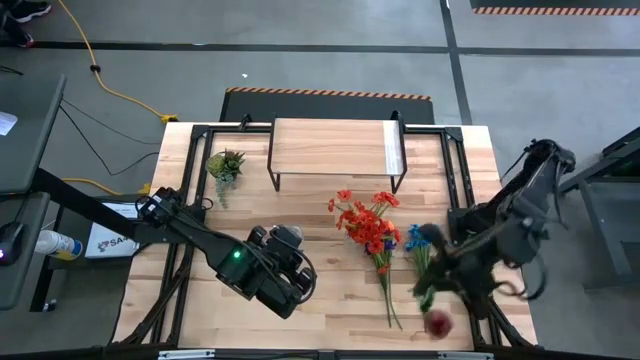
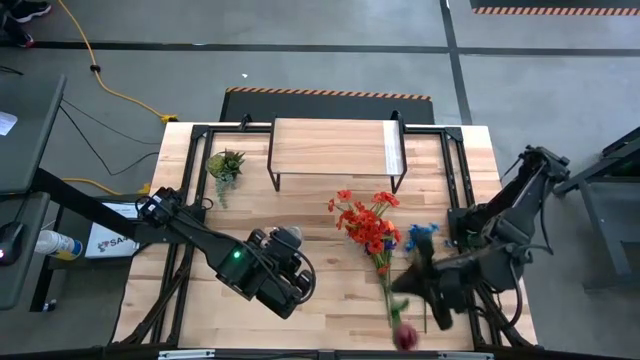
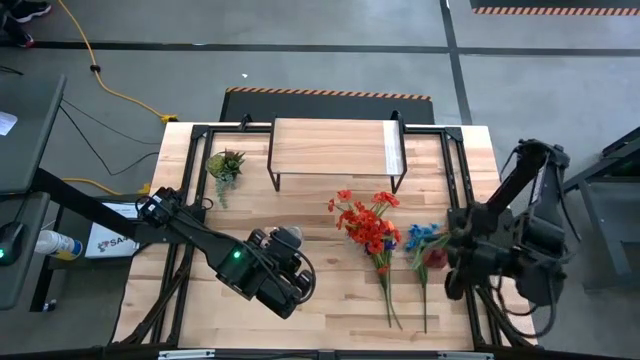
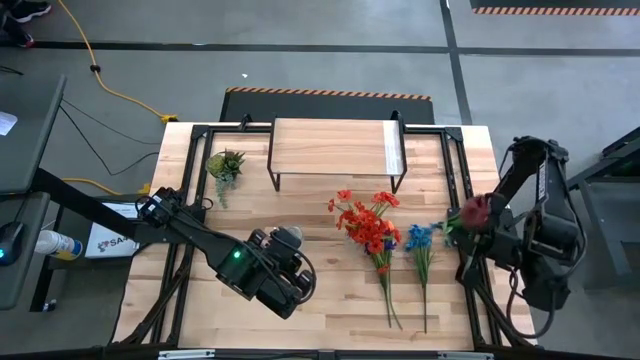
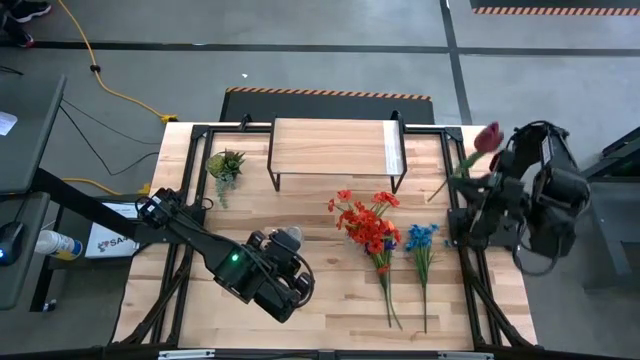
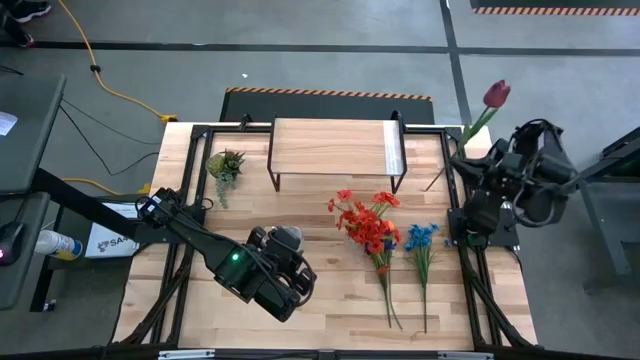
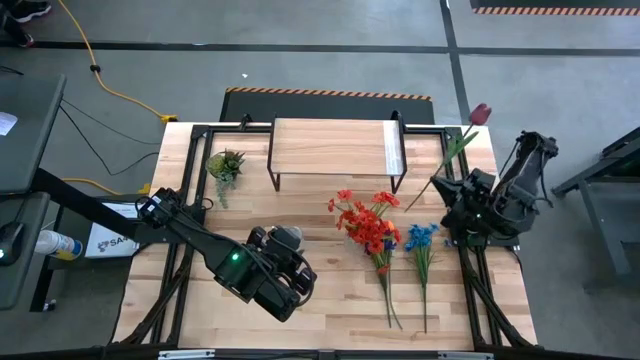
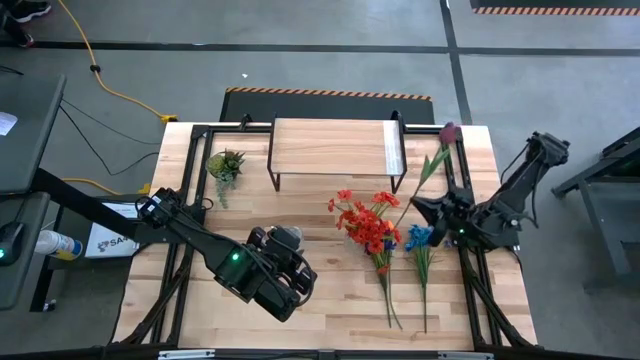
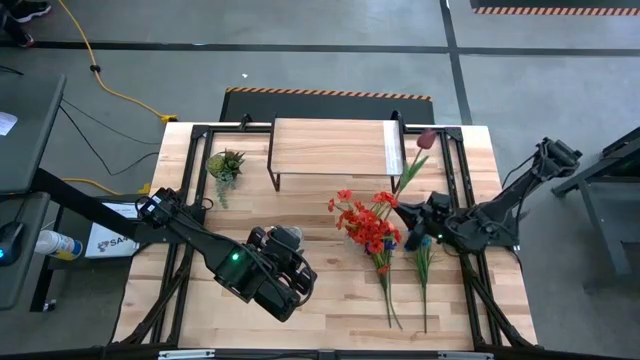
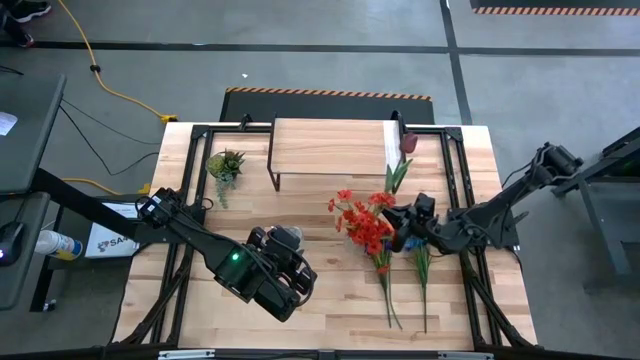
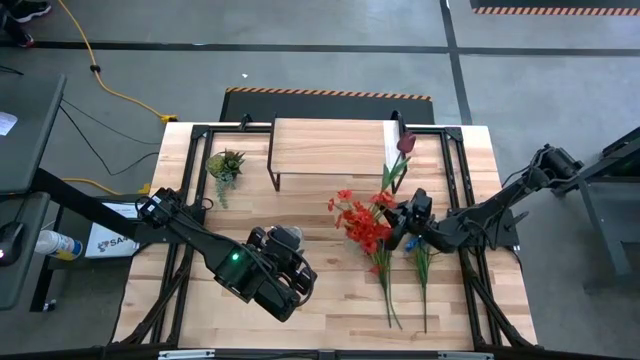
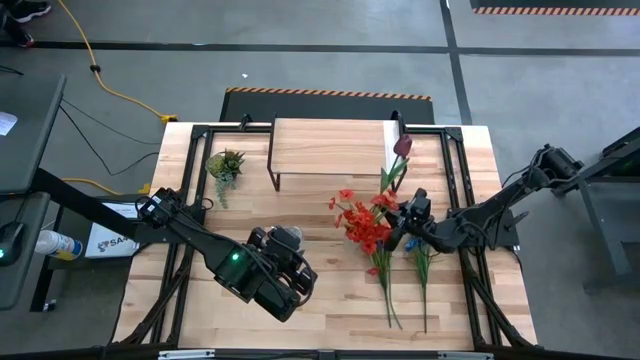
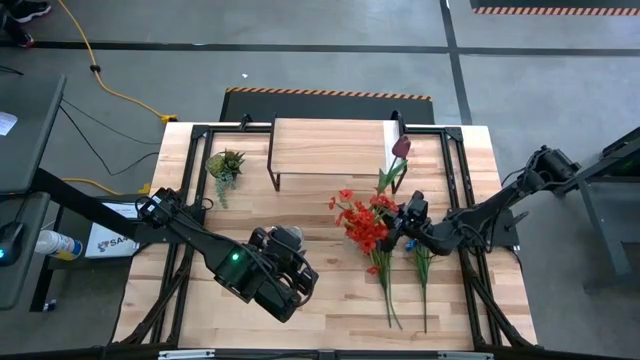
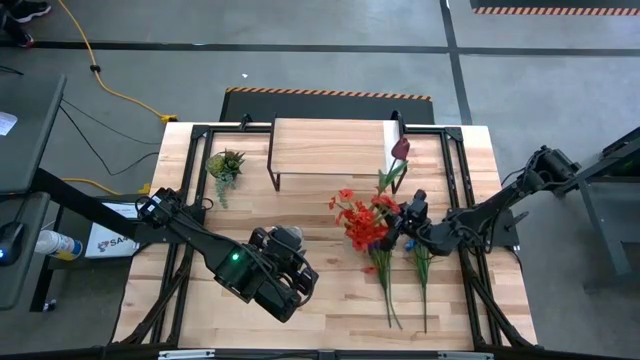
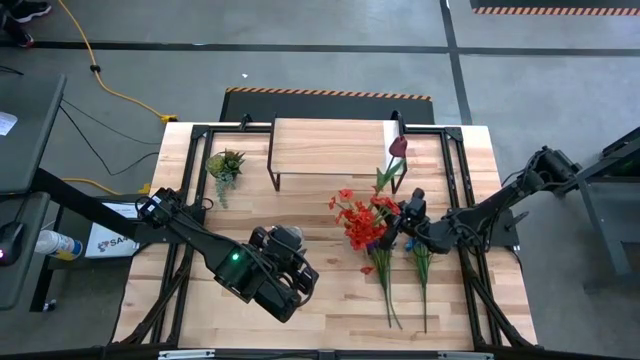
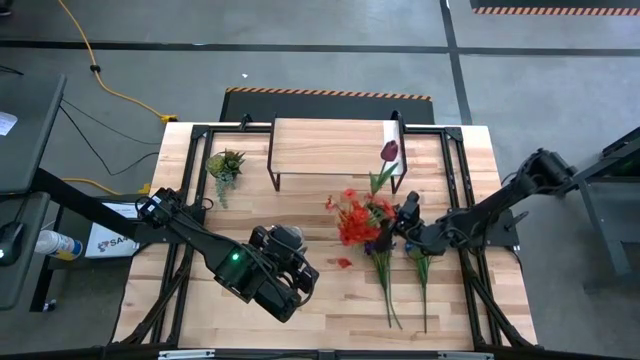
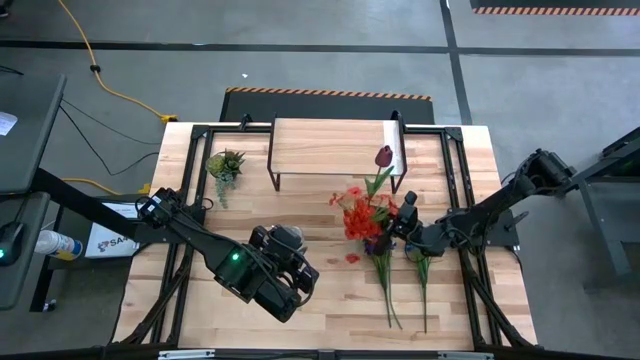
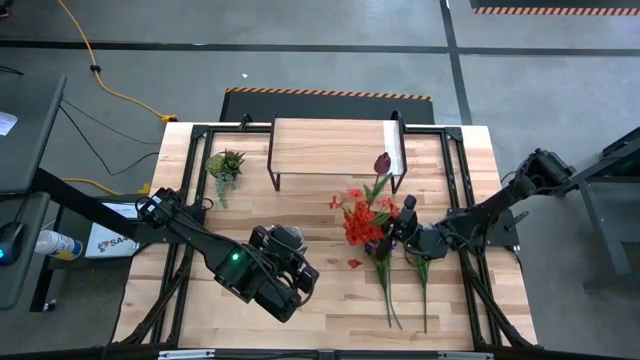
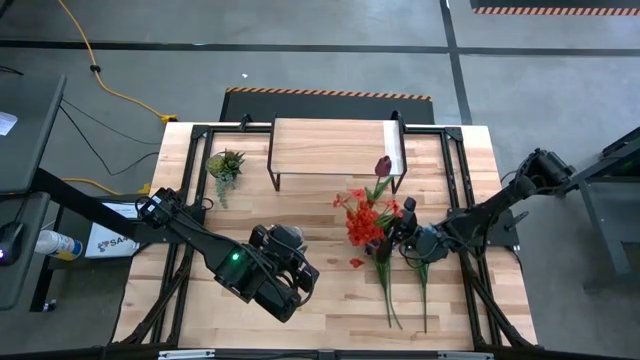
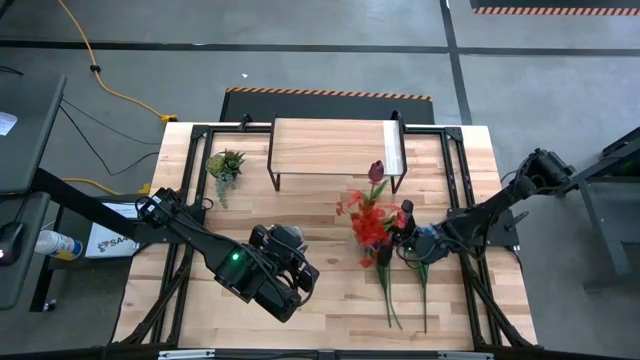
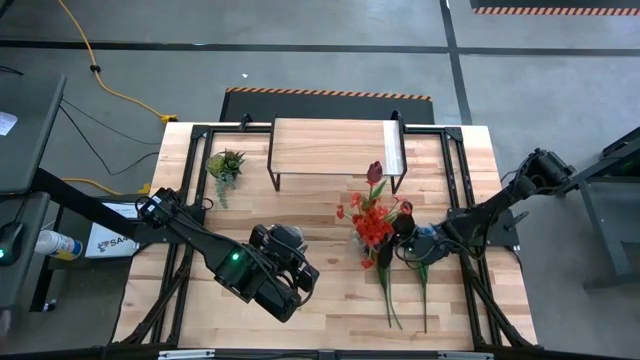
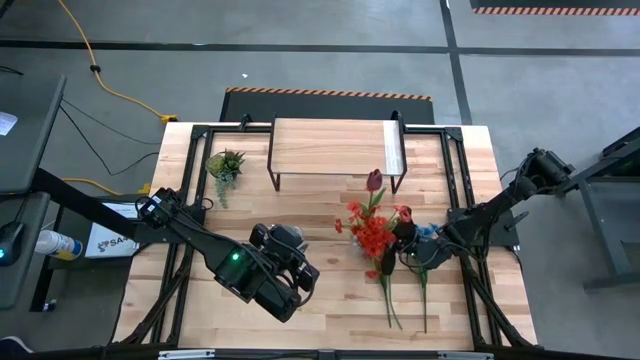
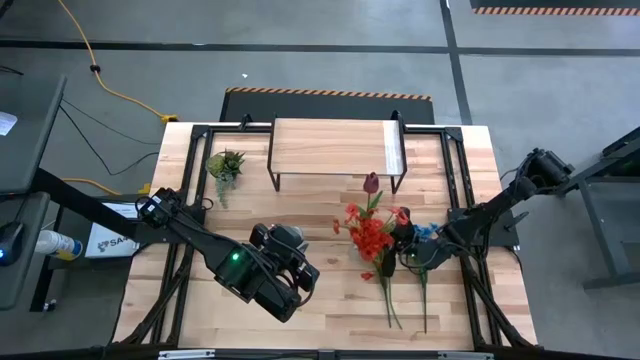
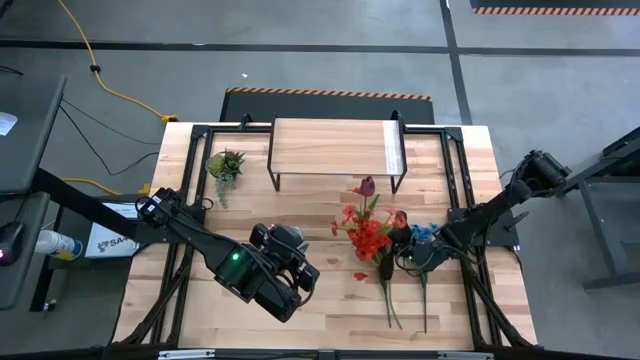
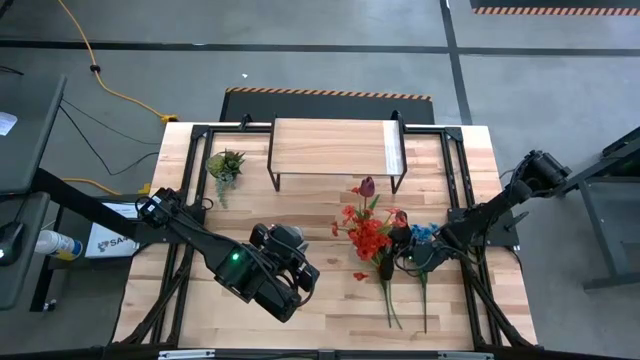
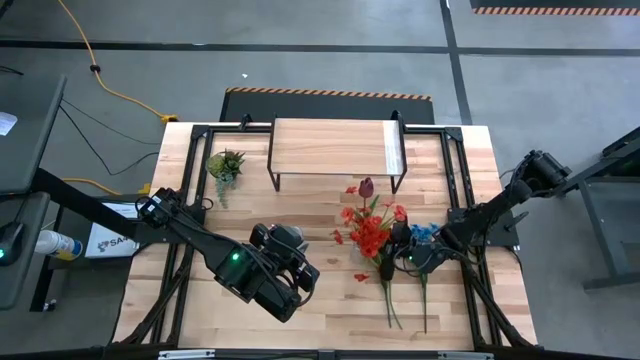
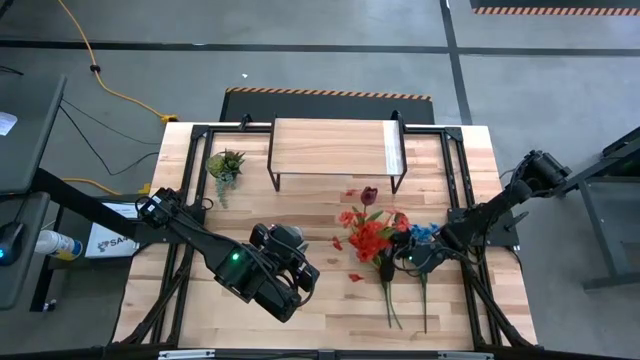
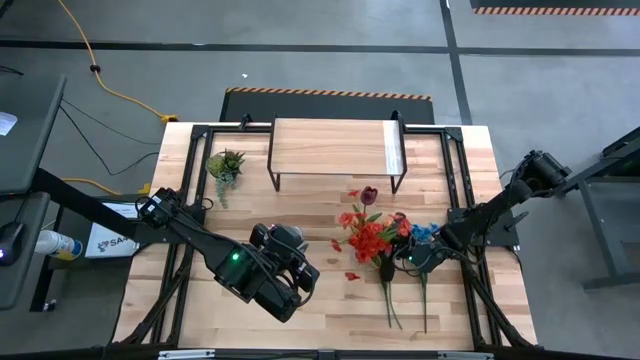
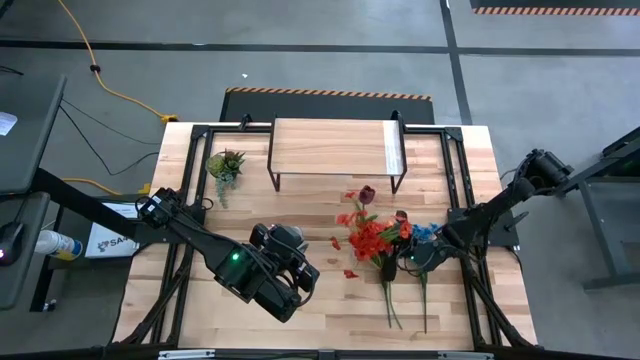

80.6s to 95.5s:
Task: Pick and place flowers into a vace then onto a shelf
Put the red tulip into the right transparent vase

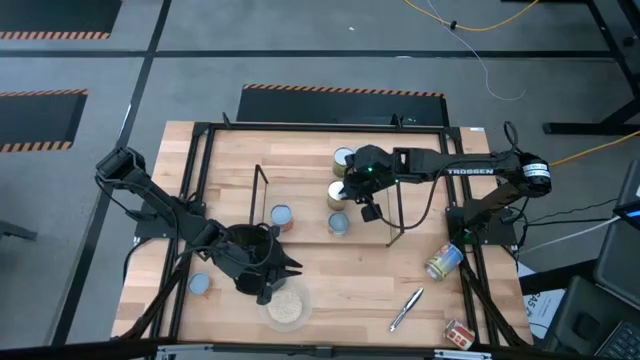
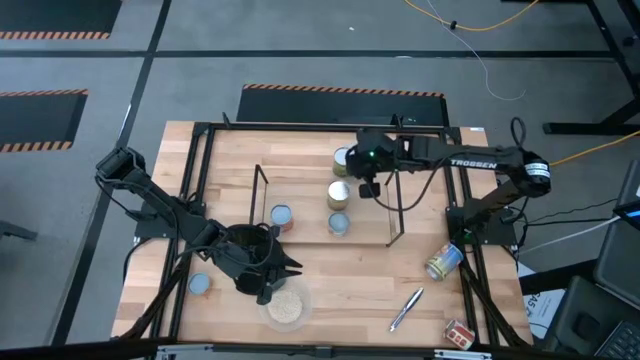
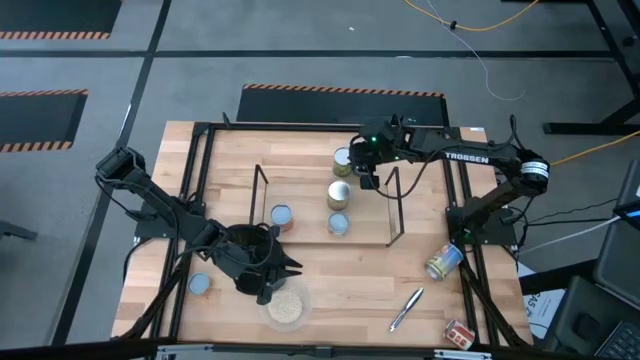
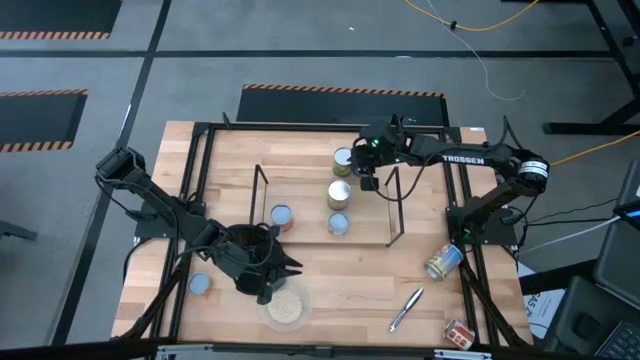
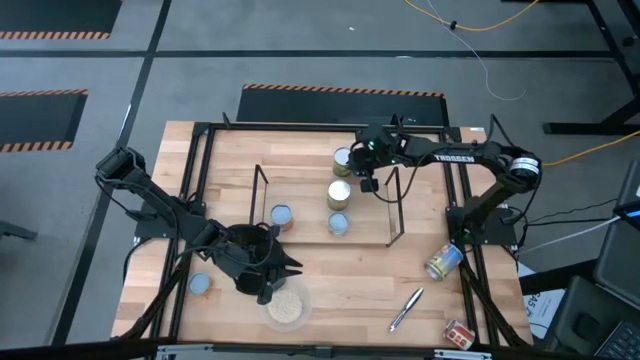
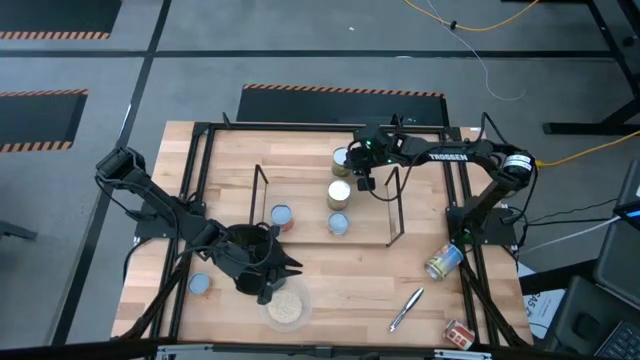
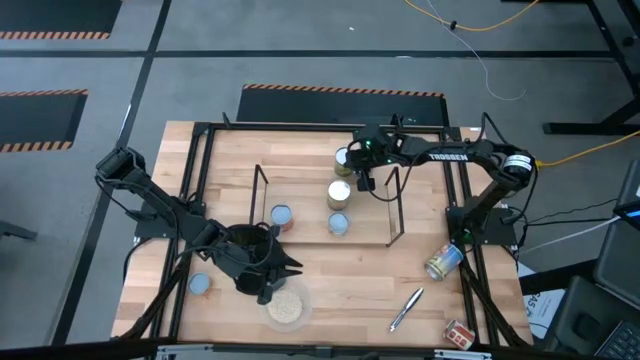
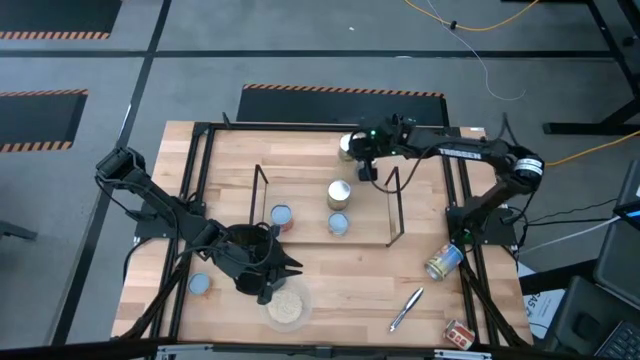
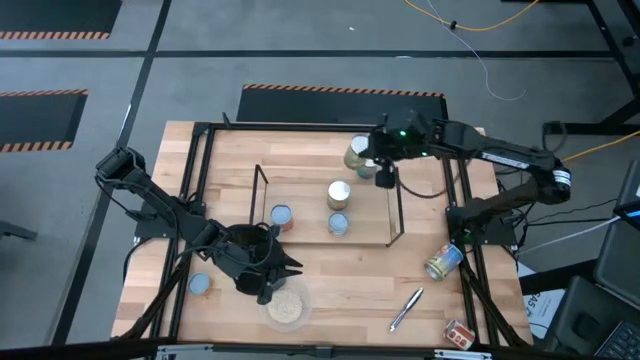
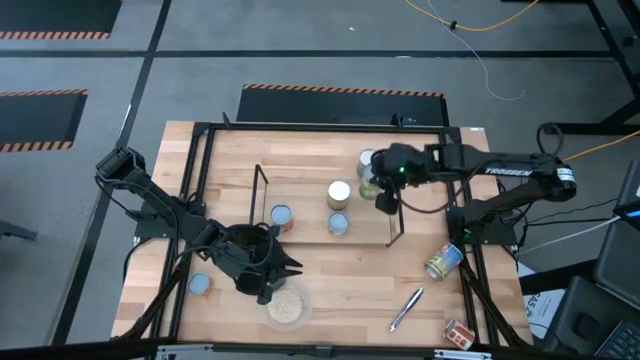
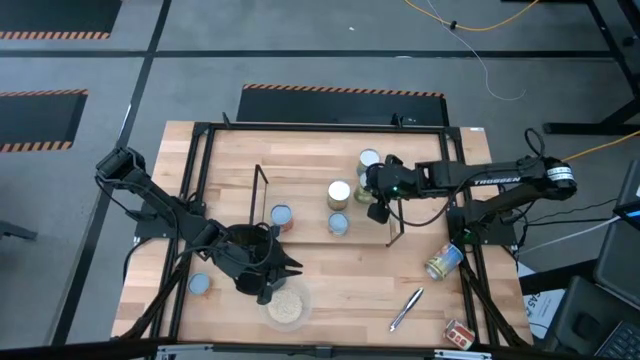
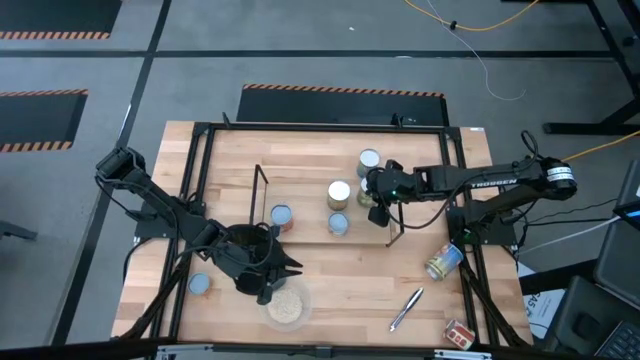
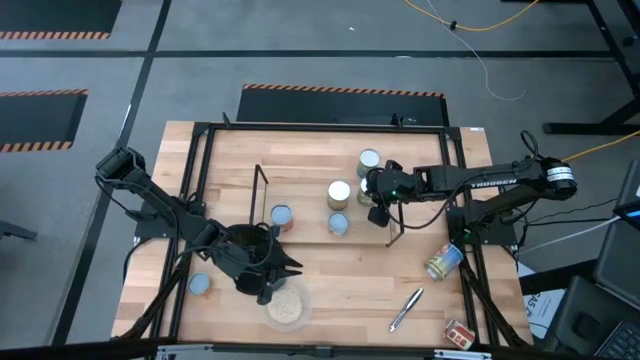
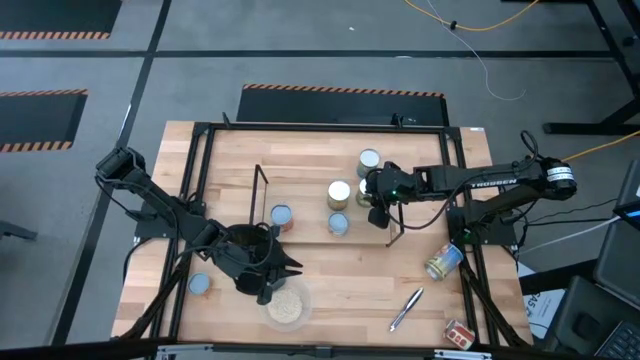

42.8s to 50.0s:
Task: Pick and place cans onto a shelf
Put the canned pears on the shelf
